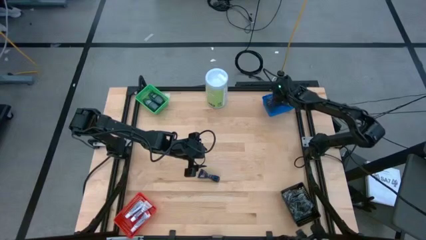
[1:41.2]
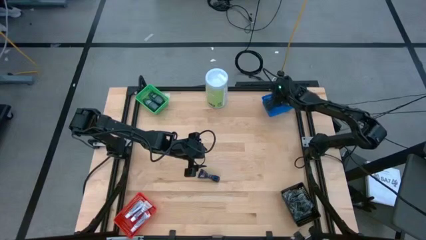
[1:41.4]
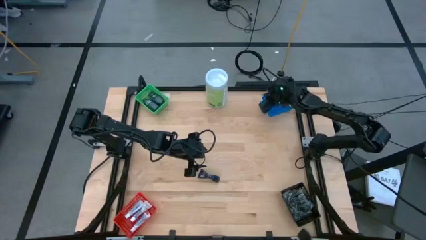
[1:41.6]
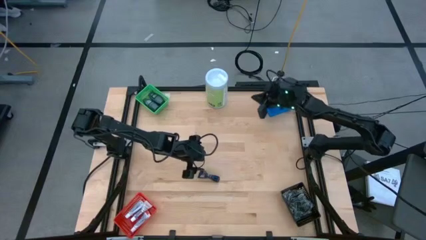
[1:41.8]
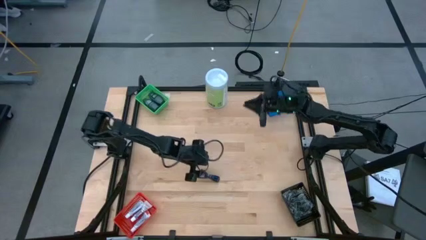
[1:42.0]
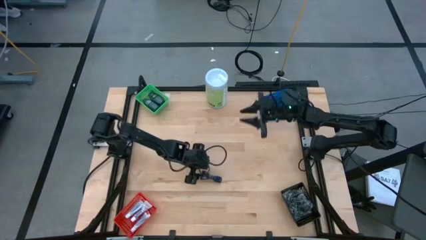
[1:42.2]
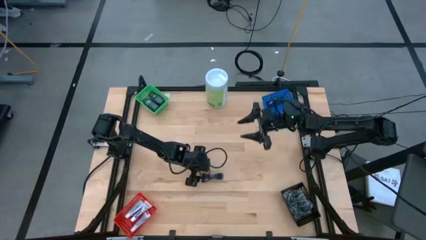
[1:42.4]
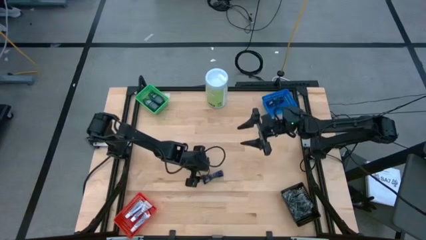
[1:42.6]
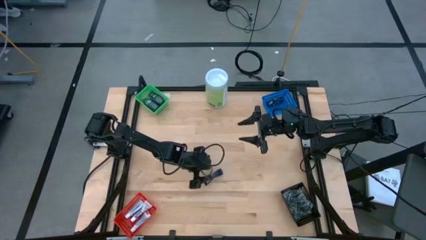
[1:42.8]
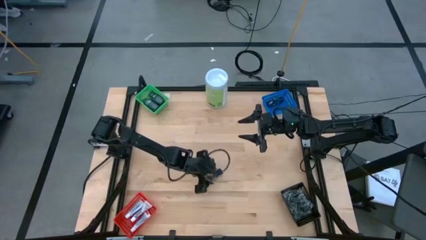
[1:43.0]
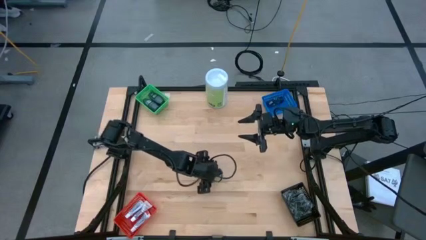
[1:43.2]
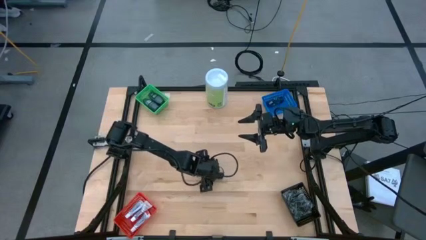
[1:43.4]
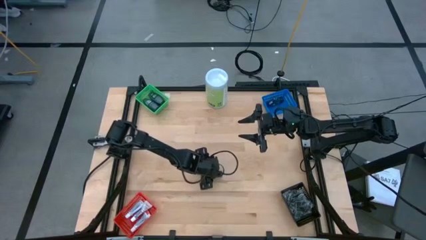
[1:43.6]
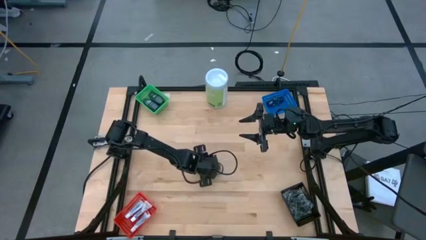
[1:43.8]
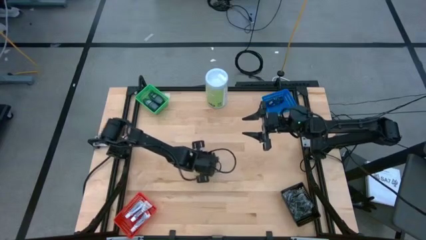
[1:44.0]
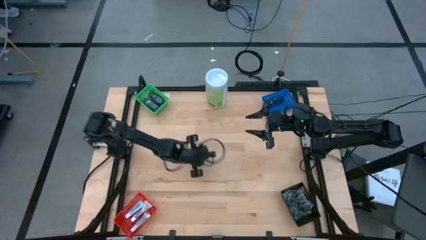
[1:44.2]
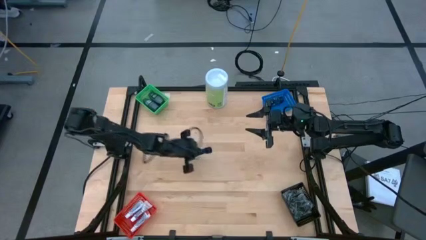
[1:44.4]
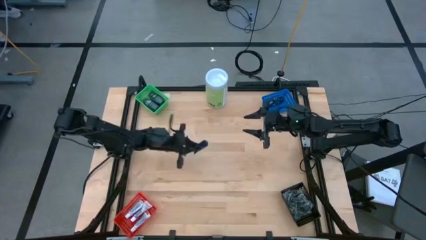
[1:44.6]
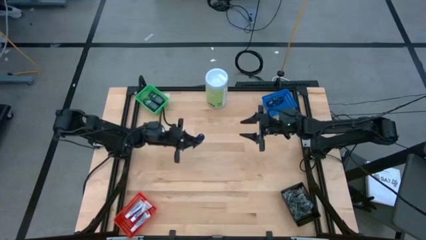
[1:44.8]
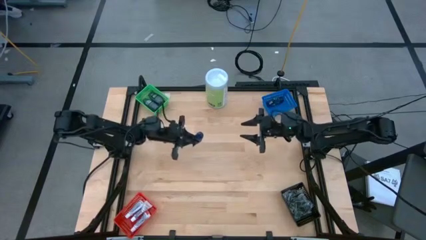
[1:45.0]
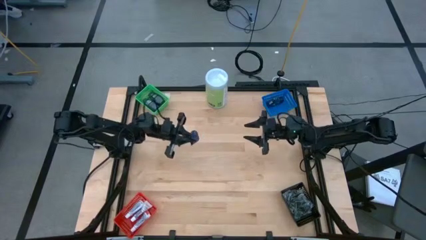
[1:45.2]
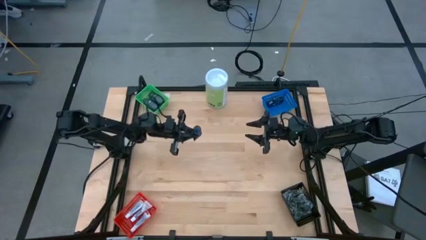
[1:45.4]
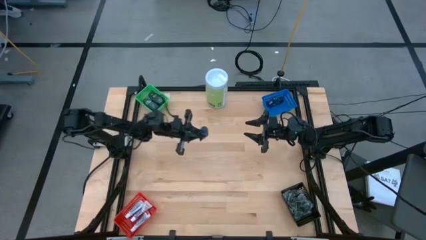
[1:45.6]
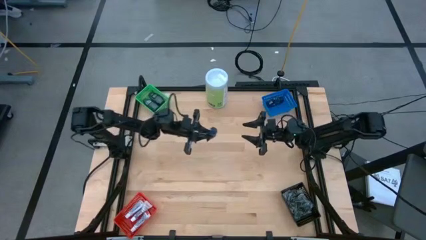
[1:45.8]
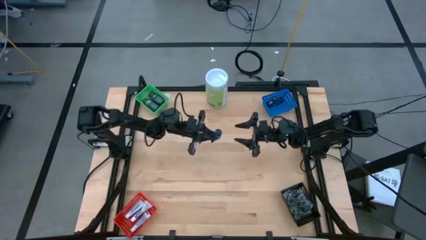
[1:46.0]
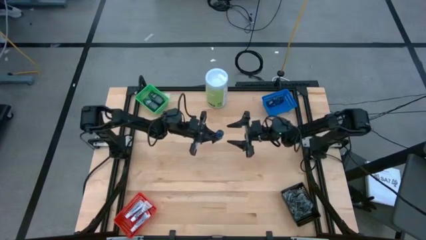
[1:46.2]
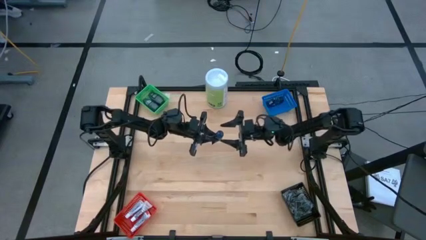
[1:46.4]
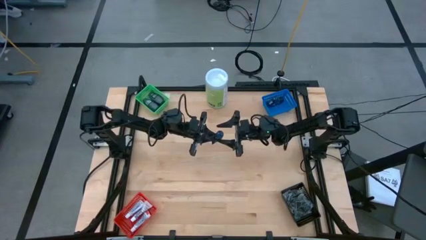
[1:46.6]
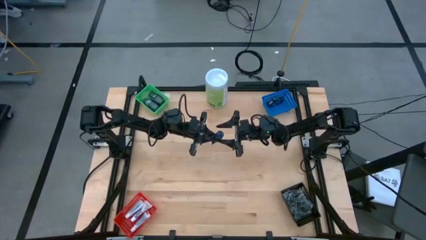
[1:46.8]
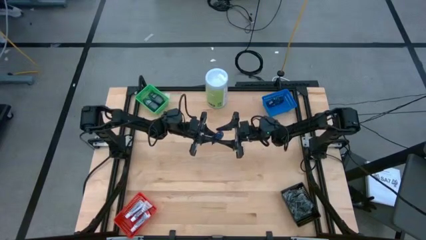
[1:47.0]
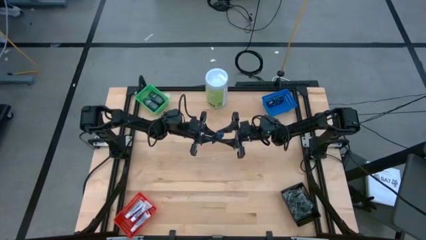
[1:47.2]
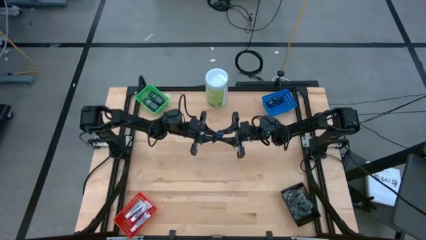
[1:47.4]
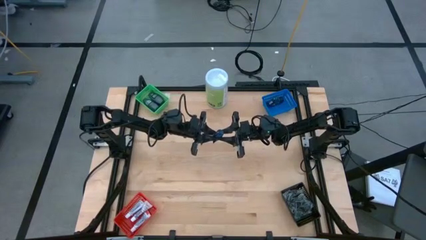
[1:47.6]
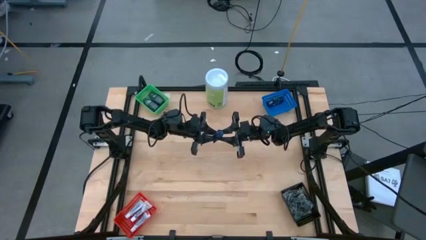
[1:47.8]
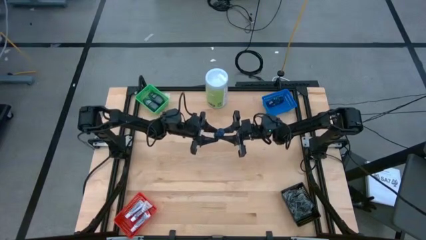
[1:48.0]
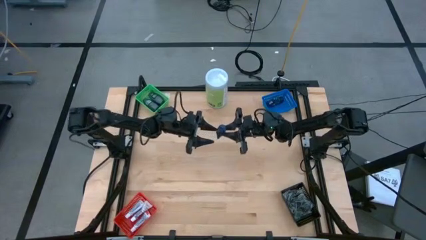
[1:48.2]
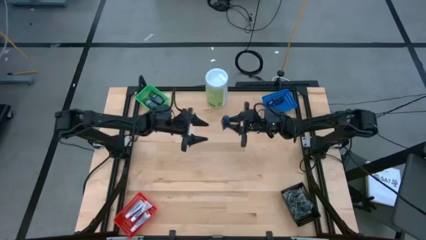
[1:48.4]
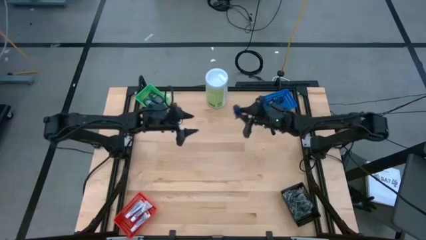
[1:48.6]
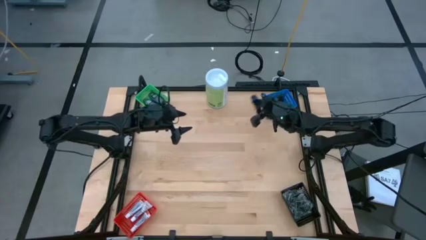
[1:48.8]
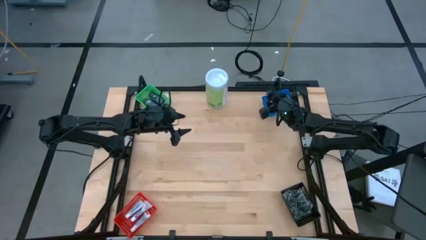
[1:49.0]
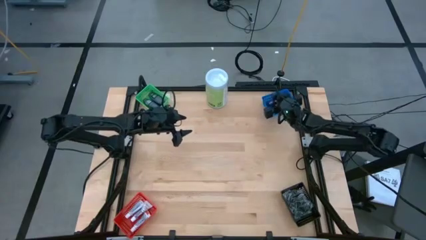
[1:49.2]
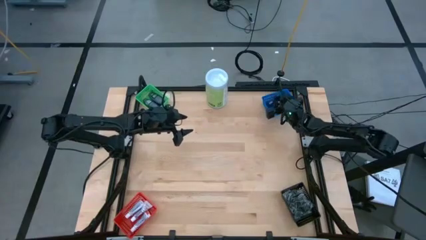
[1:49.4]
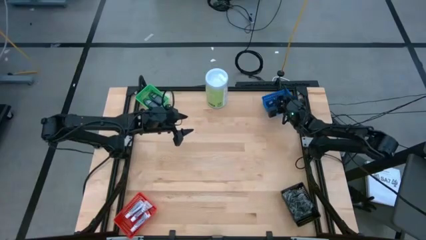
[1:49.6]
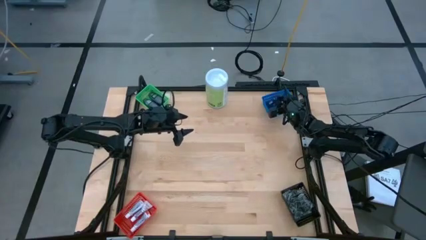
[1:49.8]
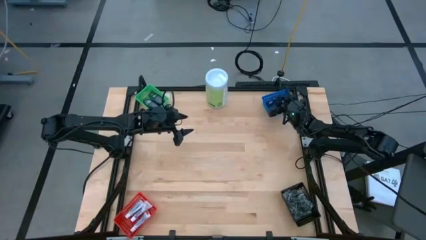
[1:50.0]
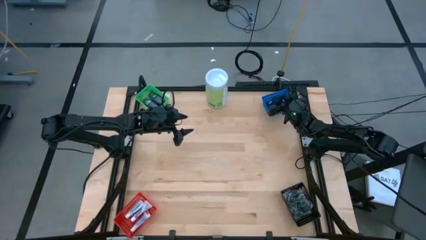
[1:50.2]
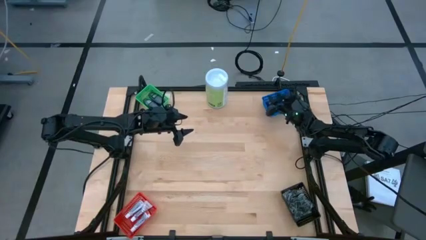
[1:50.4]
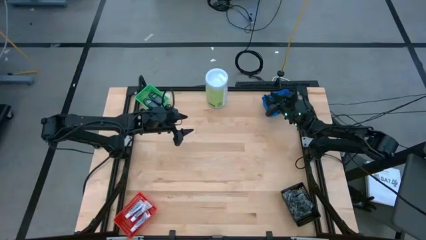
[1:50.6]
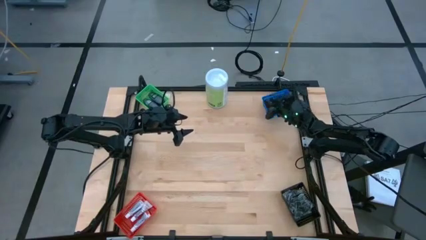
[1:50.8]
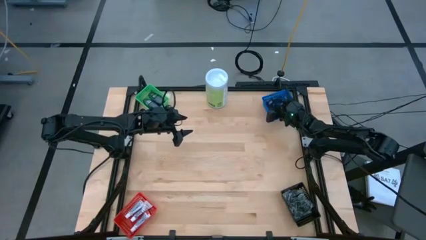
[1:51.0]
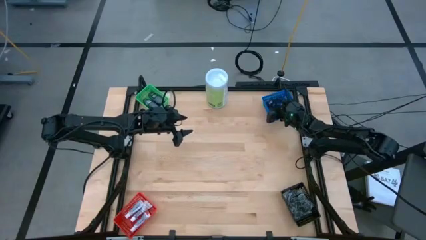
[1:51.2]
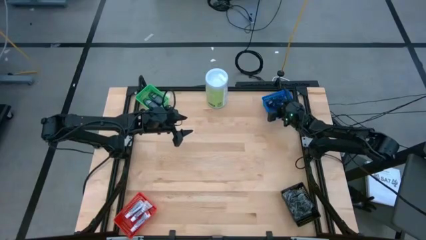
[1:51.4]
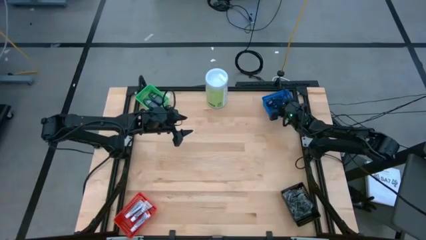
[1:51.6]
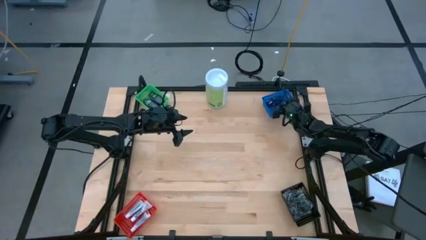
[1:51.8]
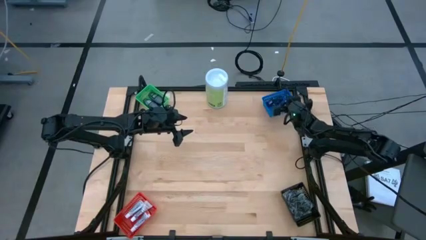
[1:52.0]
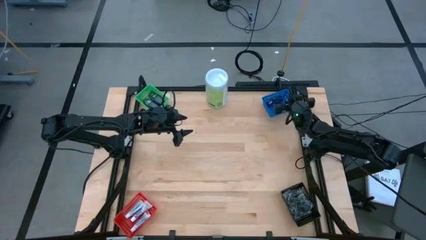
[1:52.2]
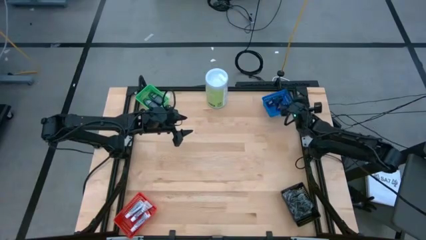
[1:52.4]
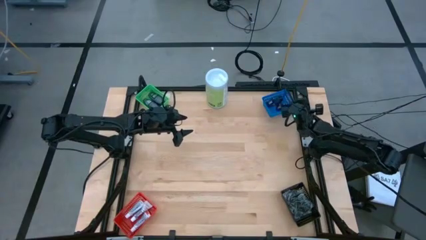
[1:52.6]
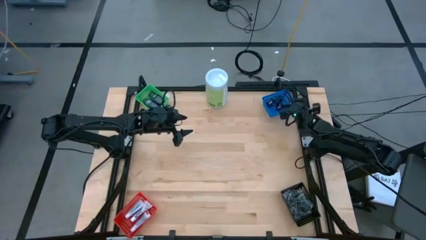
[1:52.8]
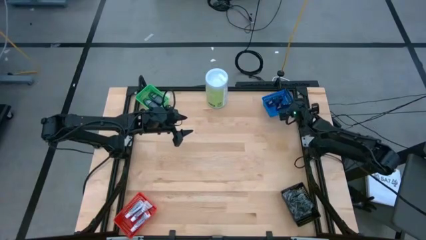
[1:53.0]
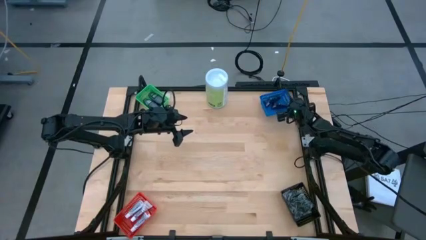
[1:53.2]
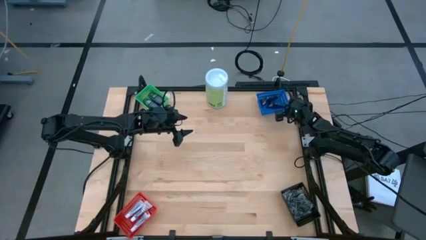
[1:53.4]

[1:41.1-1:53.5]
Task: Pick & Place Travel size toiletries
Put the left shave cream into the blue bin
